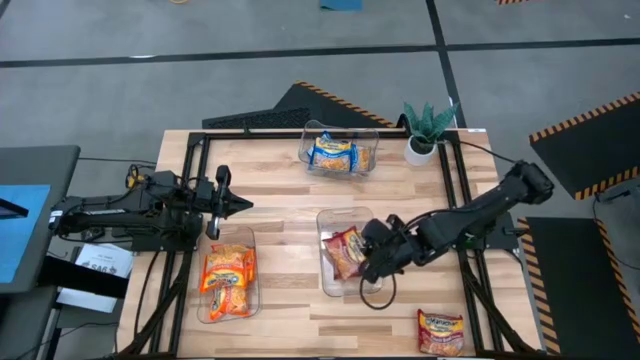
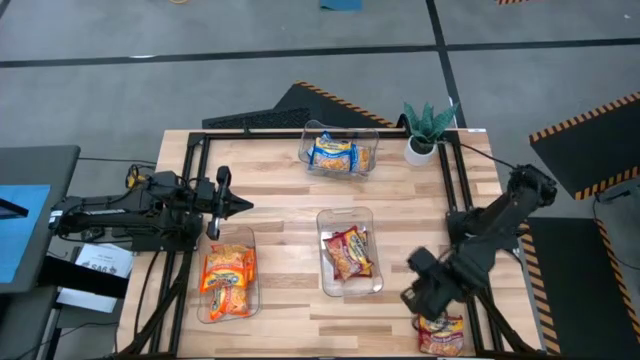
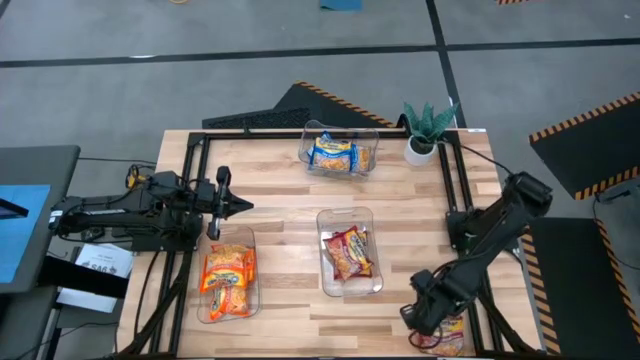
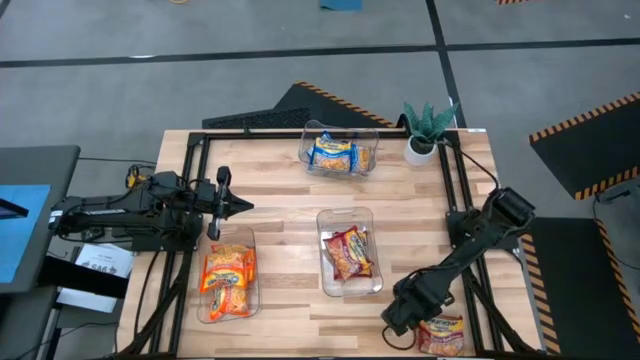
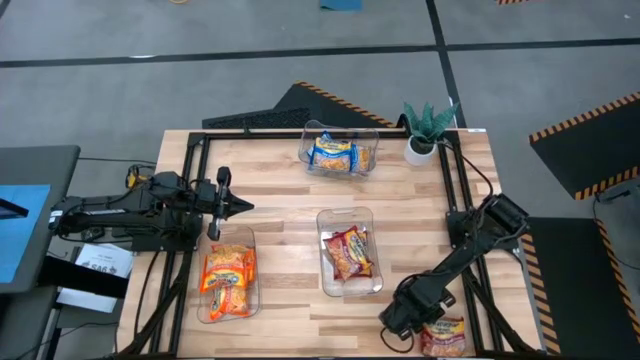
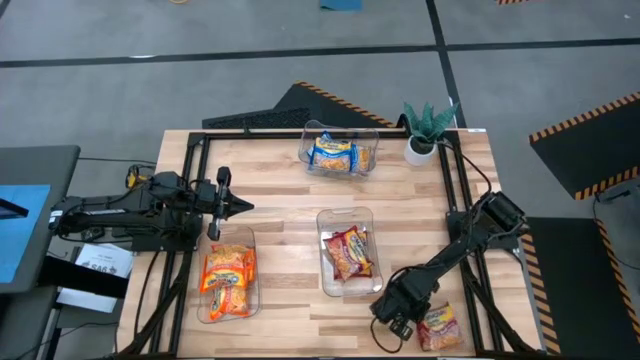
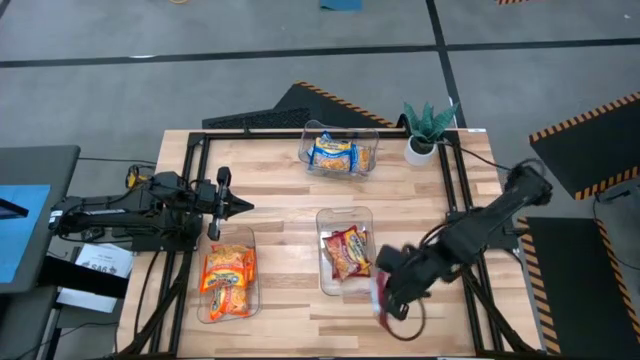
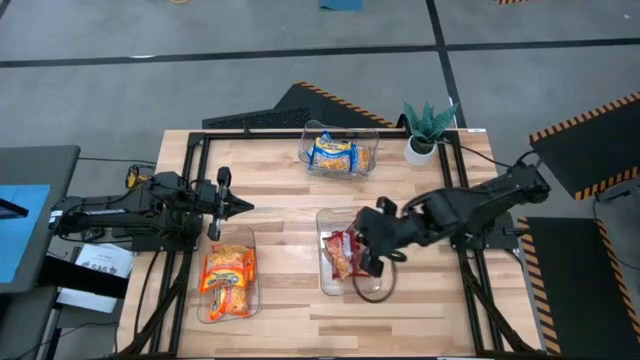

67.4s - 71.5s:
Task: Sort Maruchan noodles
Put the red noodle pack into the bottom right transparent bin

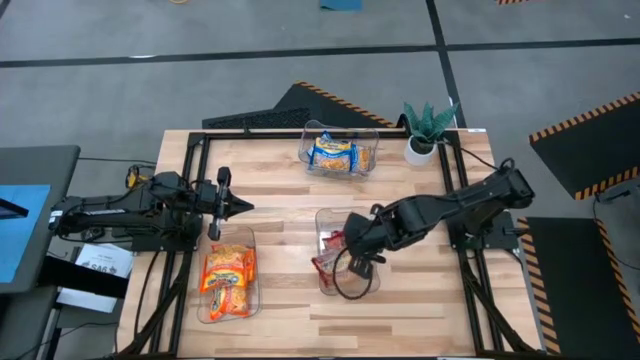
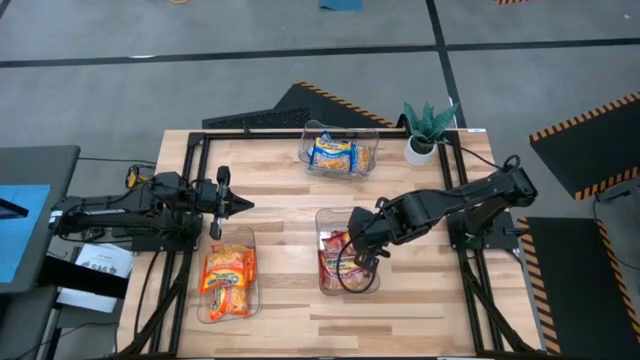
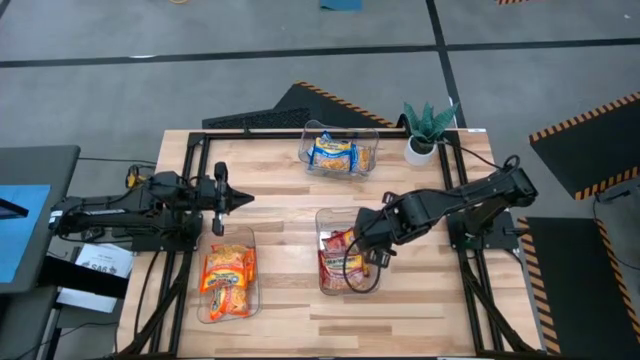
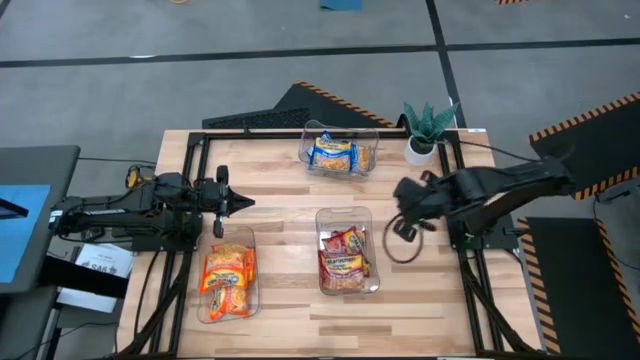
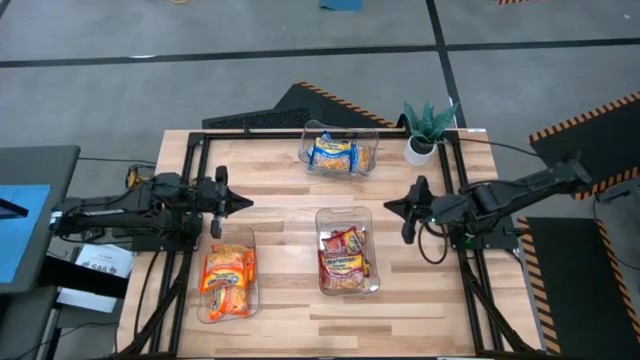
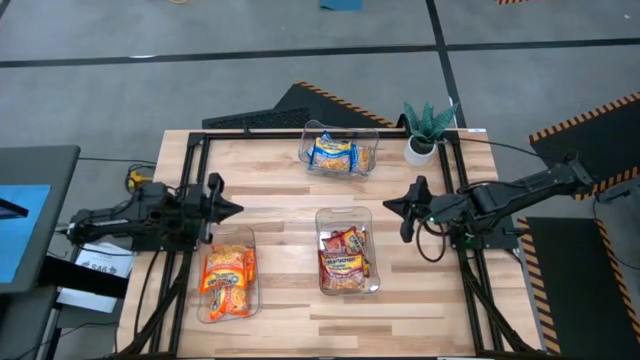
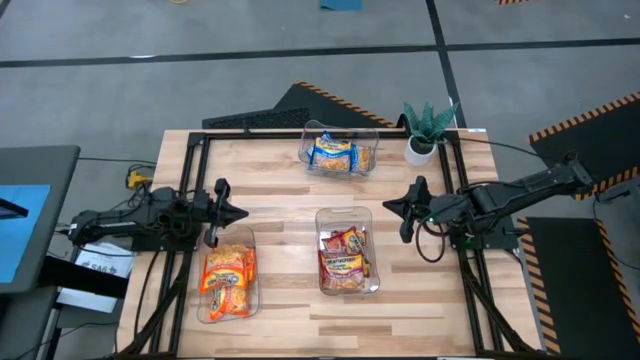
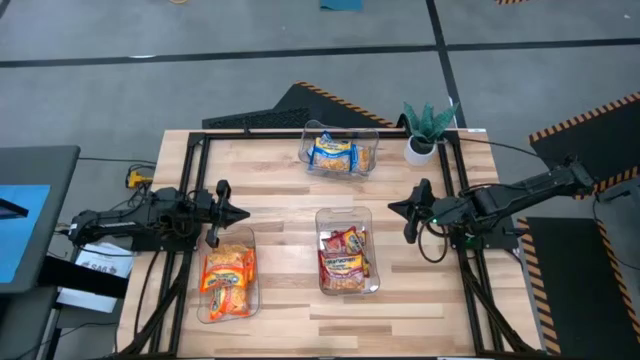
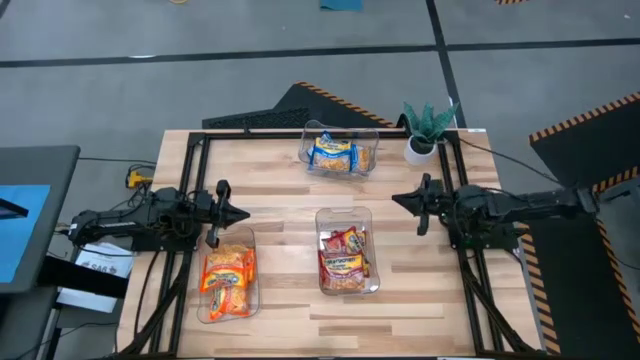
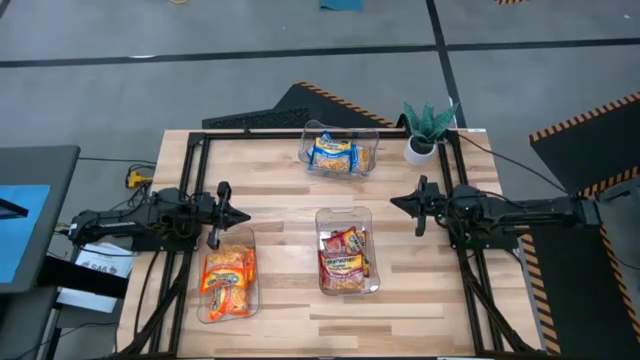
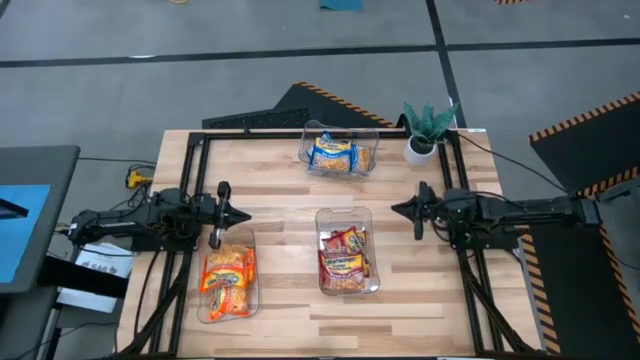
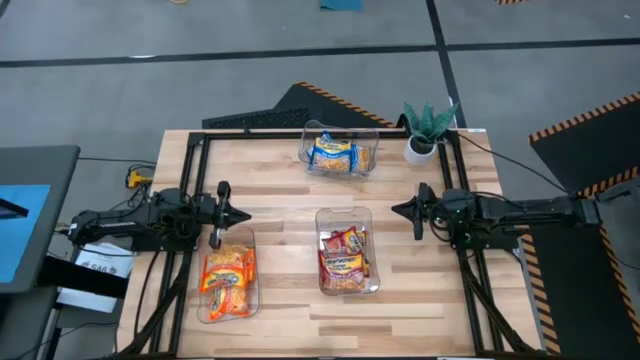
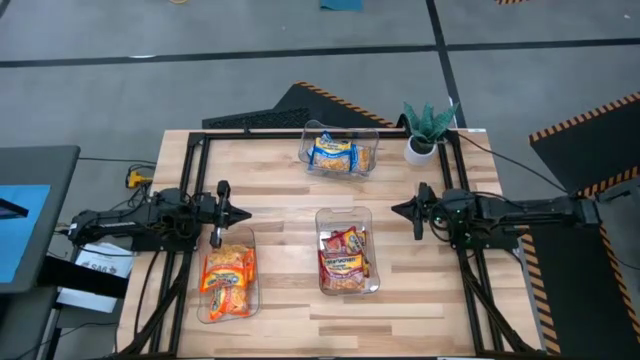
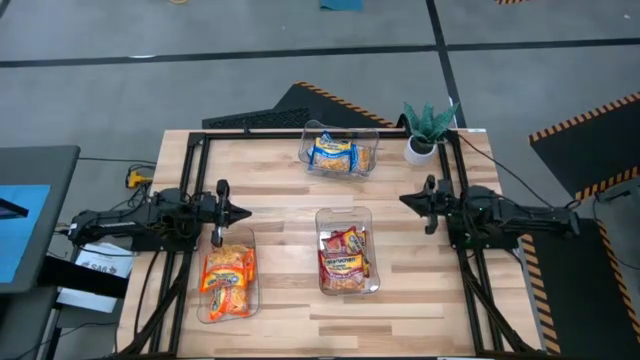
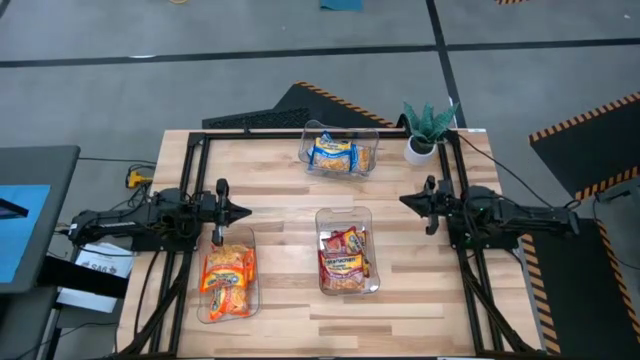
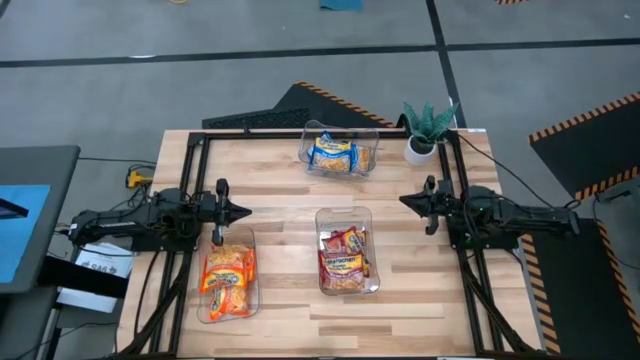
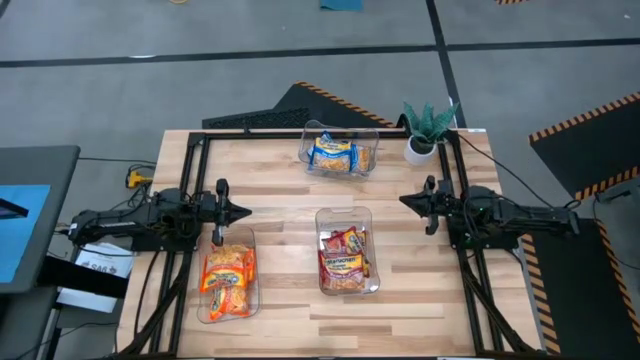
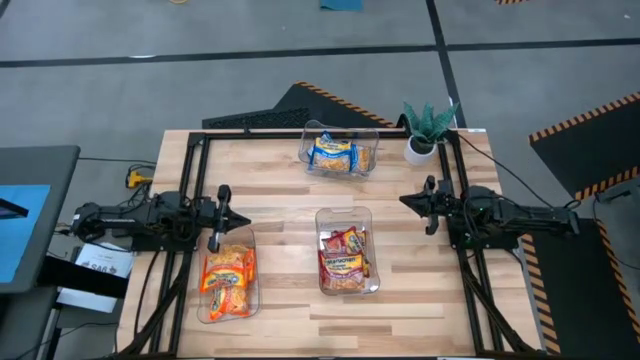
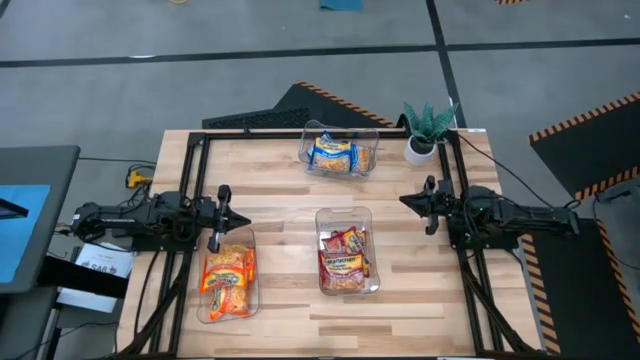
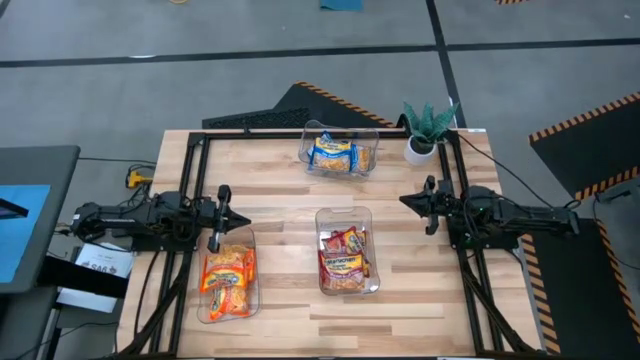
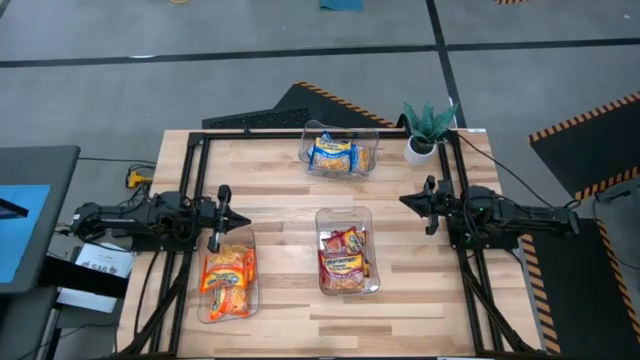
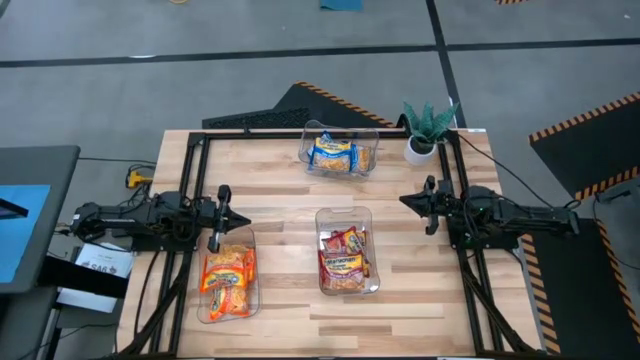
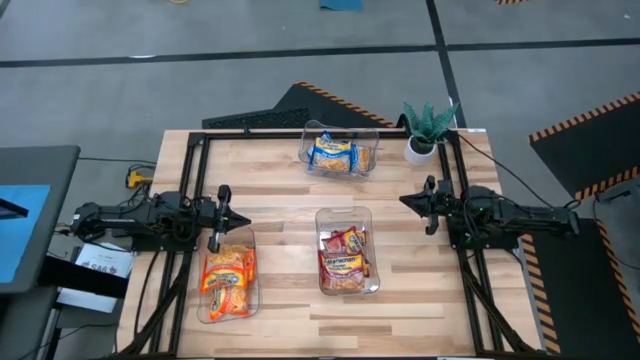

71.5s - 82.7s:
Return to Home Position

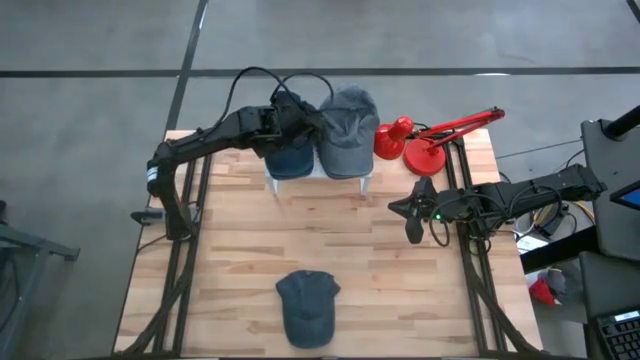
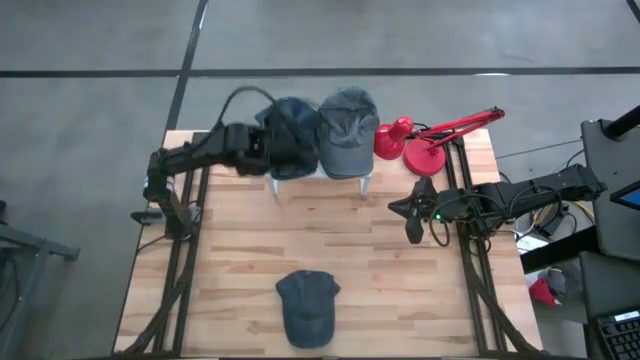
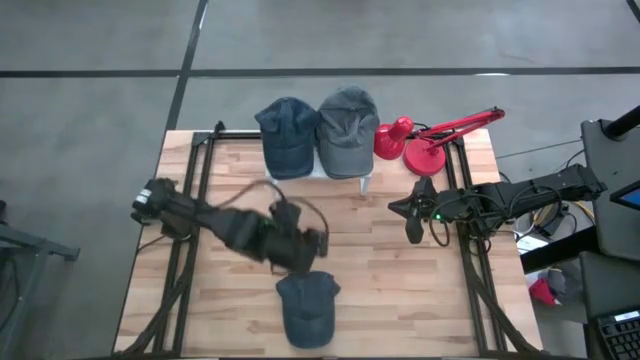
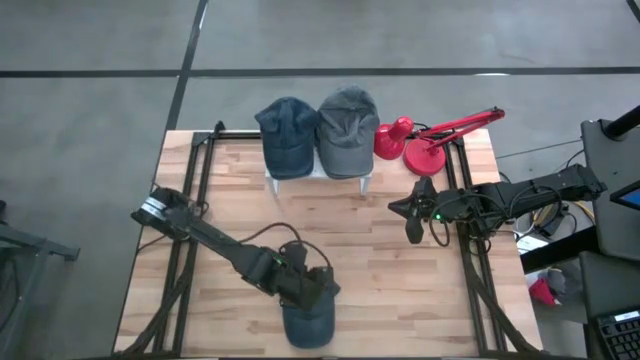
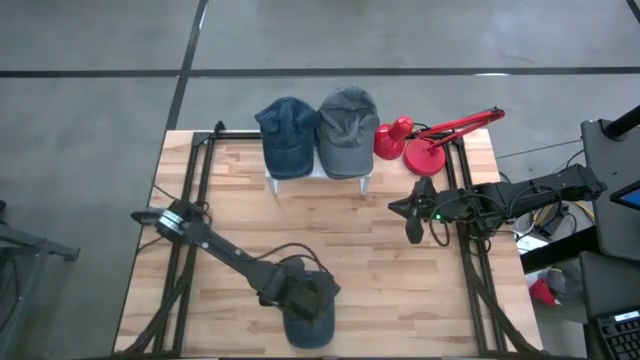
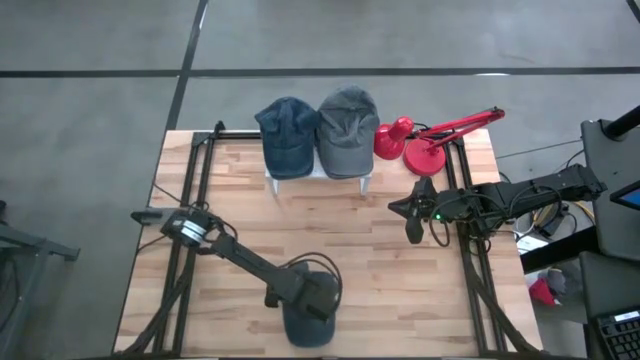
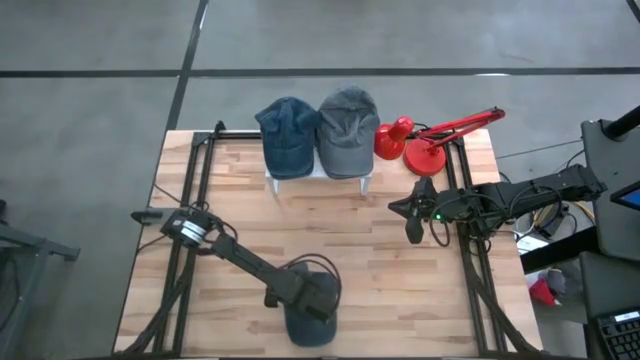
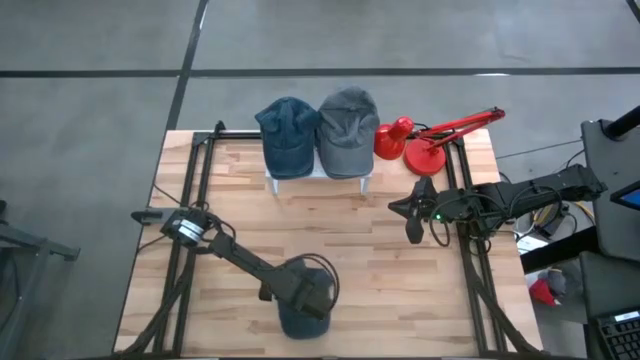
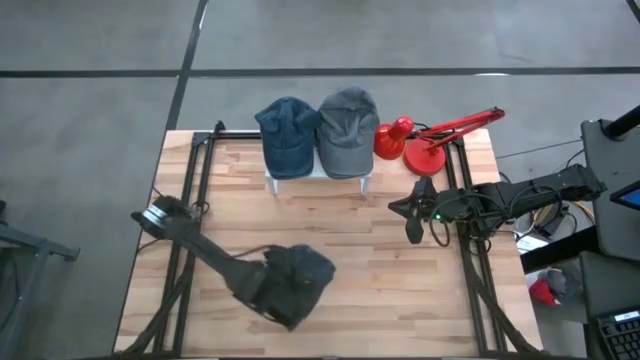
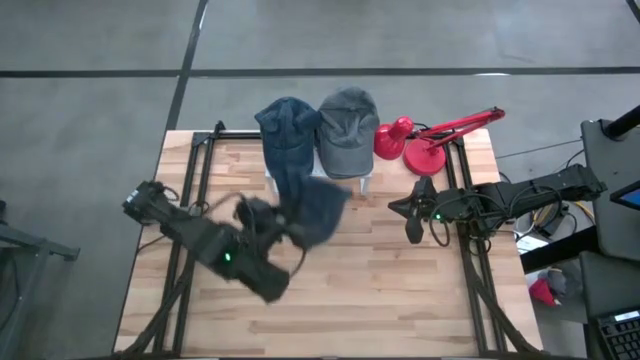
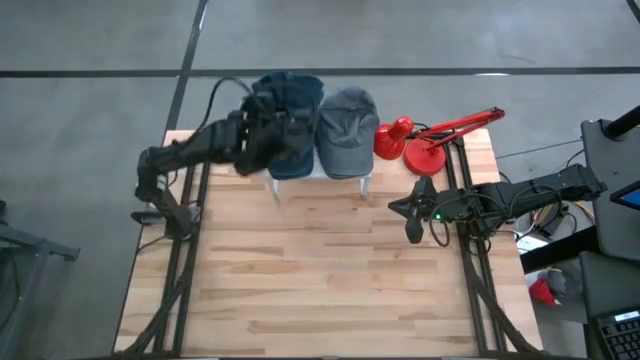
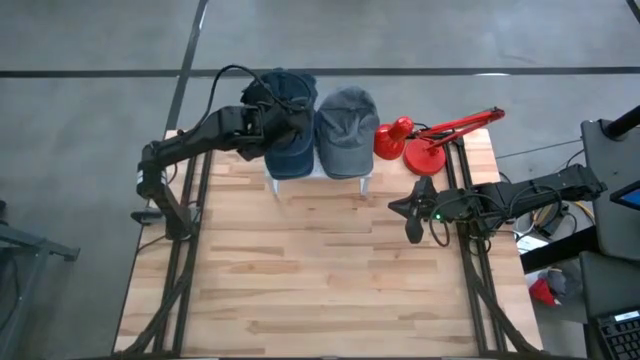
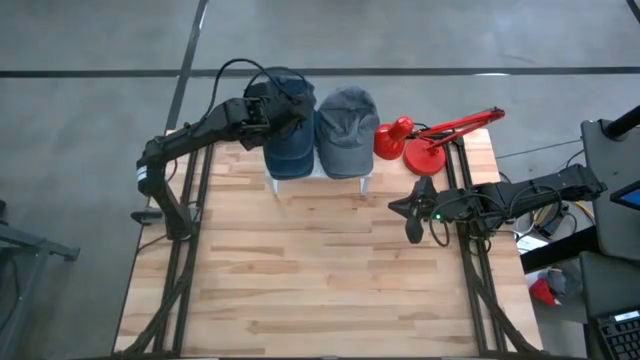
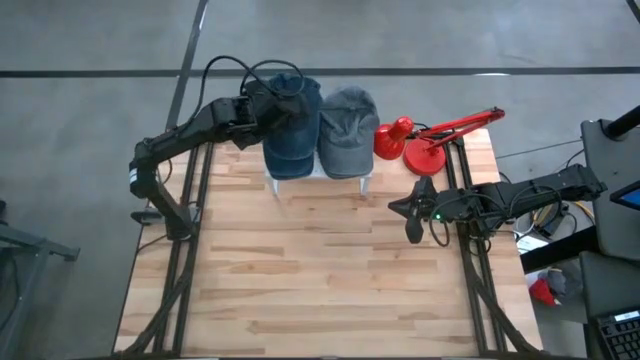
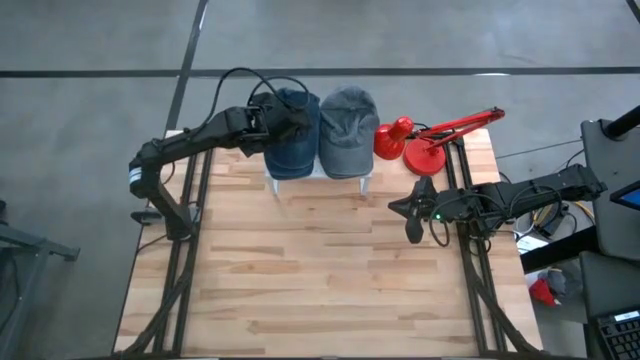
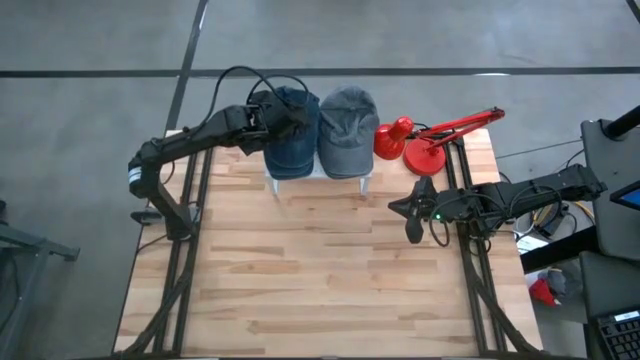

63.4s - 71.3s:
Task: Pick & Place hat
Stack the black cap on the black caps on the shelf
